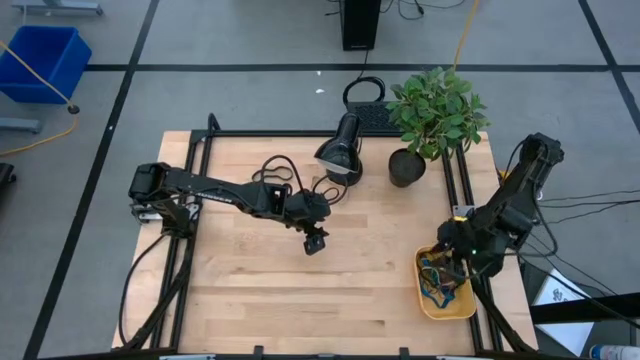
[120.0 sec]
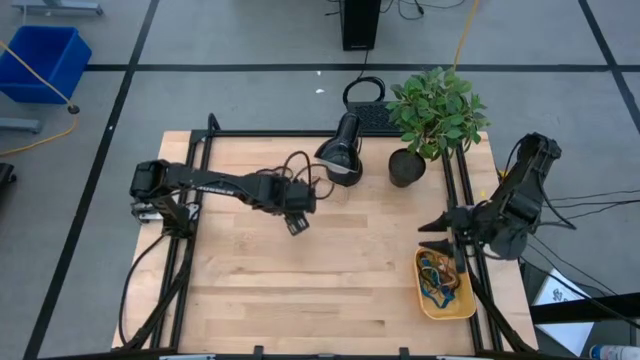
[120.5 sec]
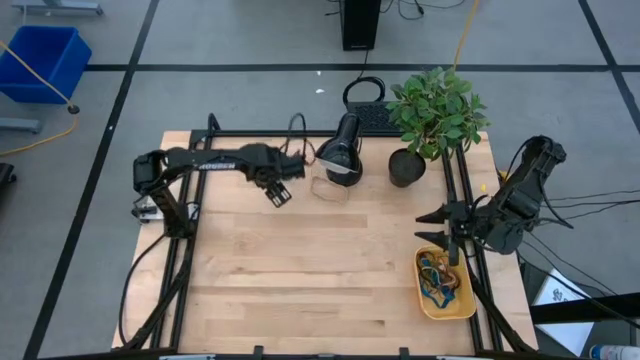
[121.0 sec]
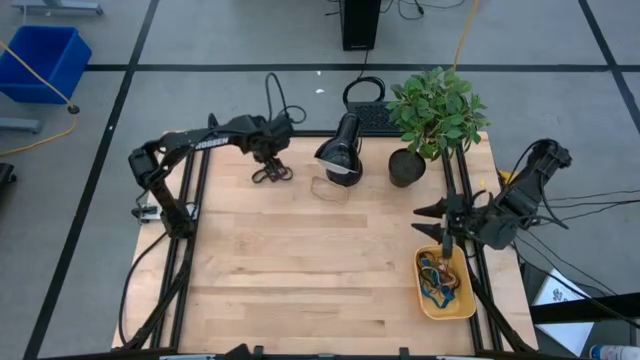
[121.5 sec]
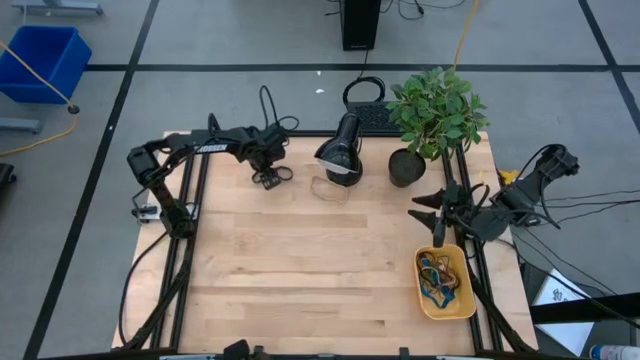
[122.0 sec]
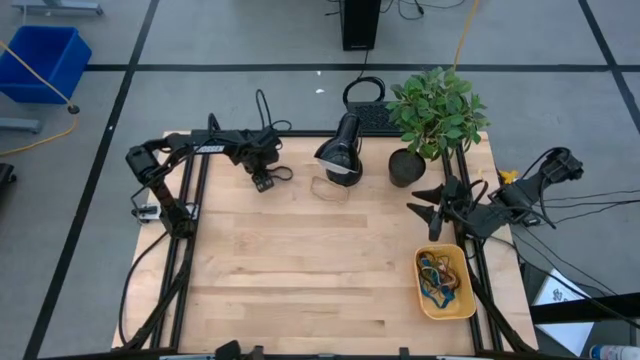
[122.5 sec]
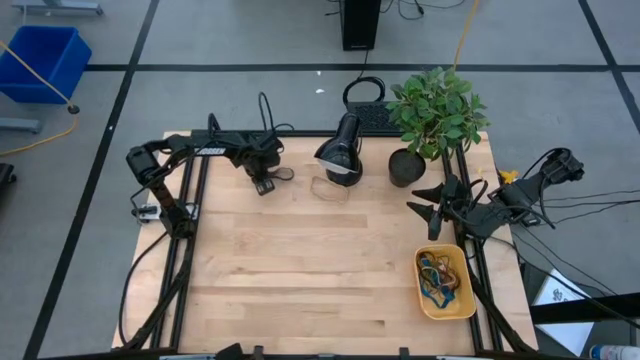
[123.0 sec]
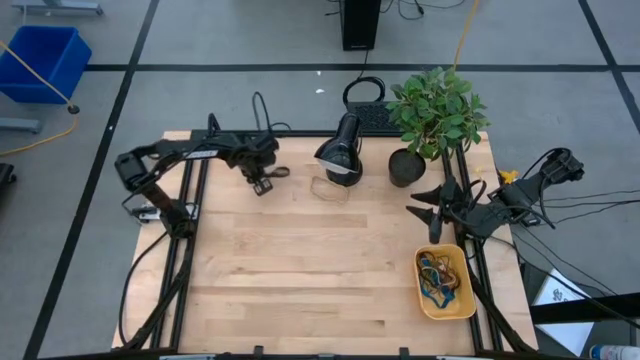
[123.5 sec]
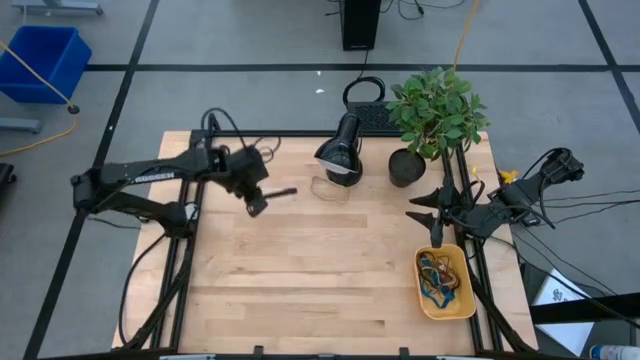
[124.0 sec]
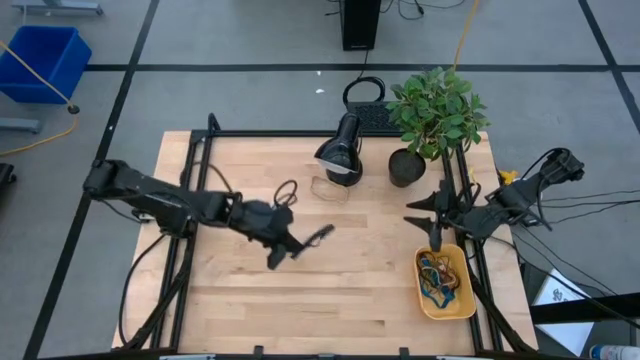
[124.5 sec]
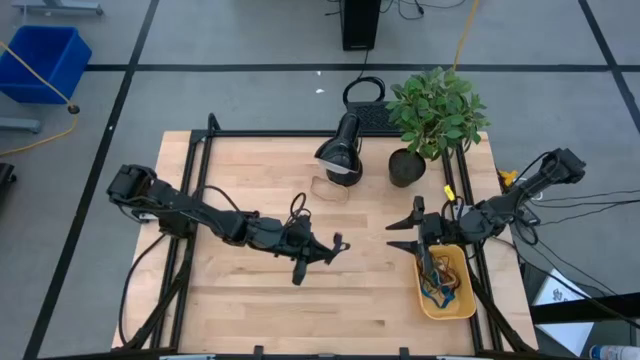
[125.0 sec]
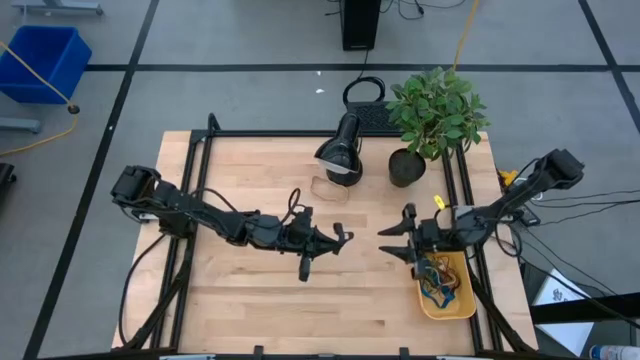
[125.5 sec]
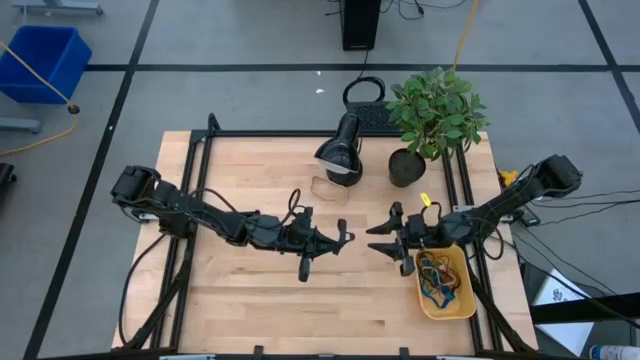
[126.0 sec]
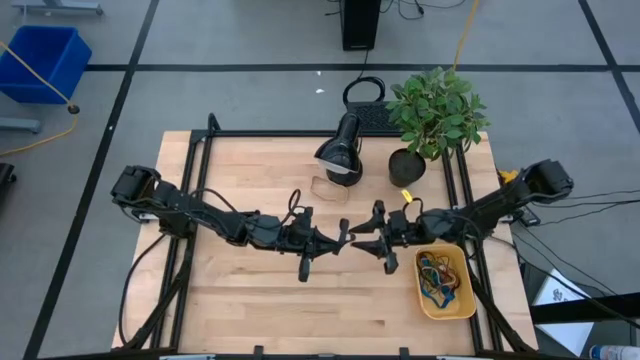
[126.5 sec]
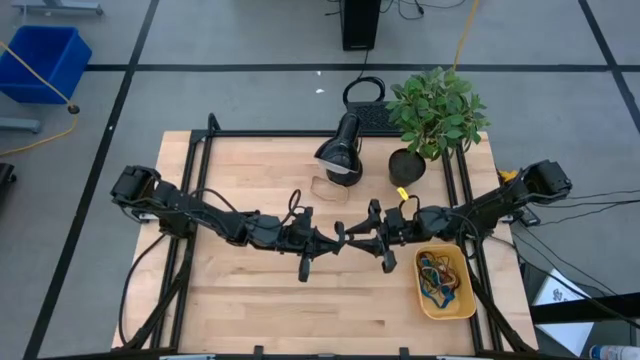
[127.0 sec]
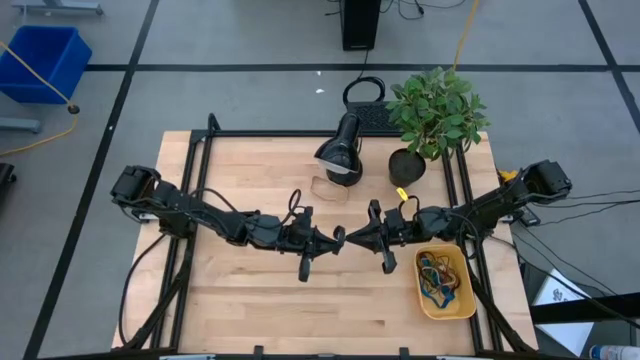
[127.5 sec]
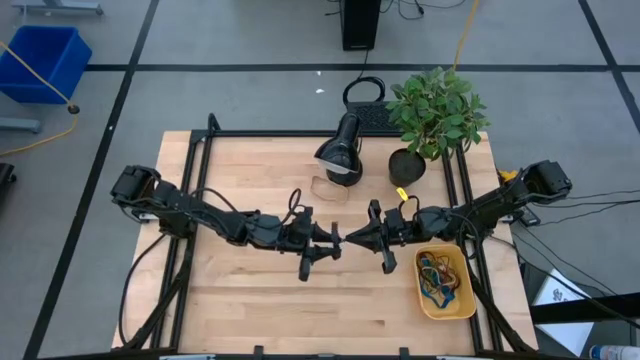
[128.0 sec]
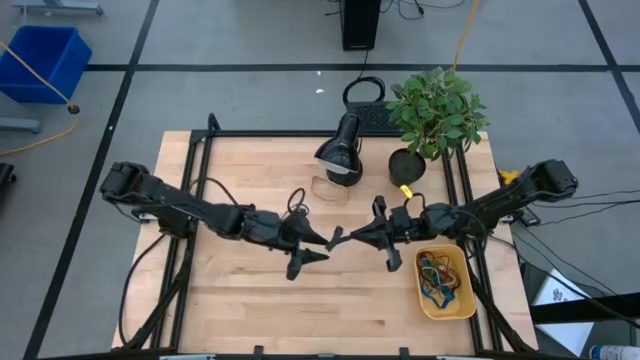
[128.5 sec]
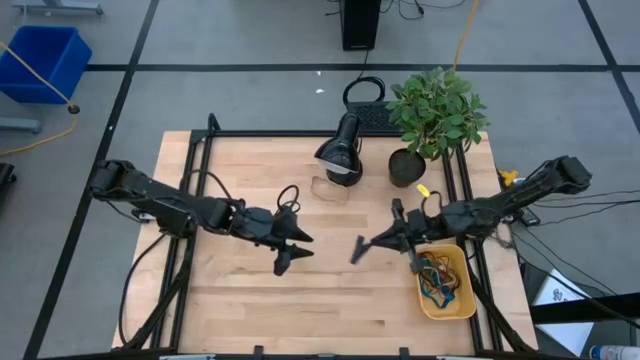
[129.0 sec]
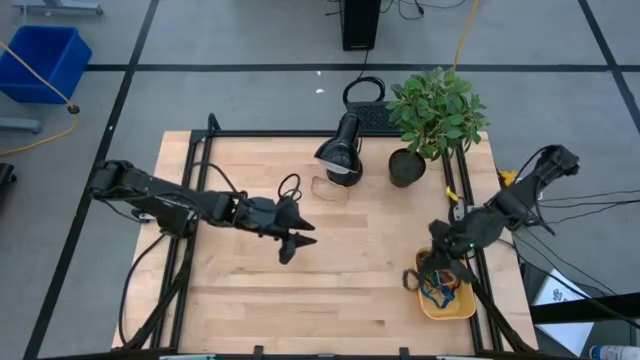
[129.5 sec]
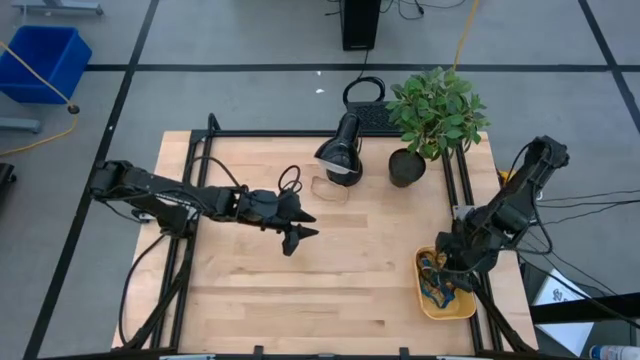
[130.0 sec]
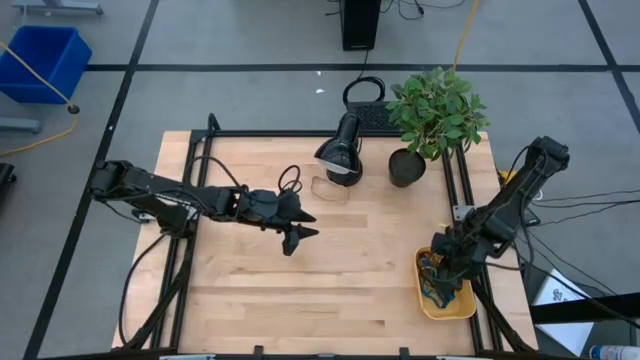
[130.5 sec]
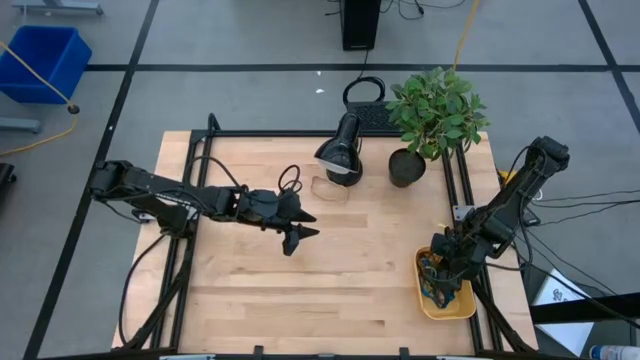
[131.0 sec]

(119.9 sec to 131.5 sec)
Task: Pick and place rubber bands into bin
Put the black rubber band into the yellow bin

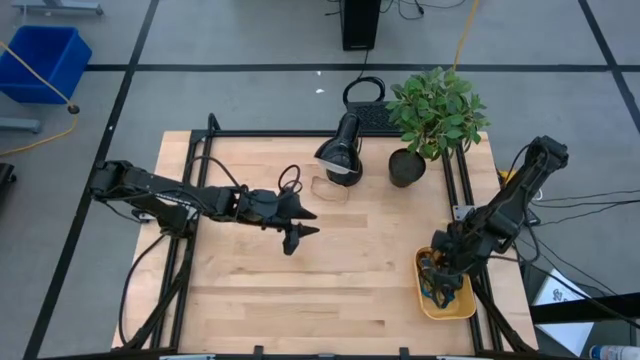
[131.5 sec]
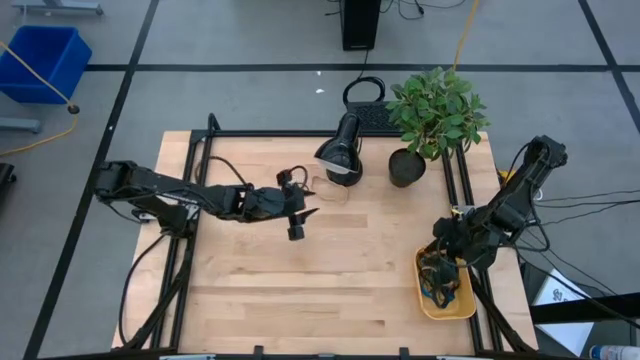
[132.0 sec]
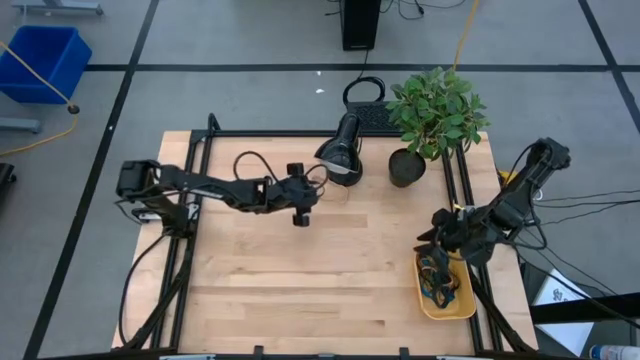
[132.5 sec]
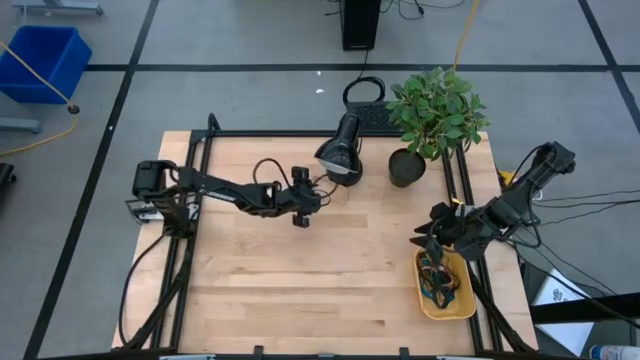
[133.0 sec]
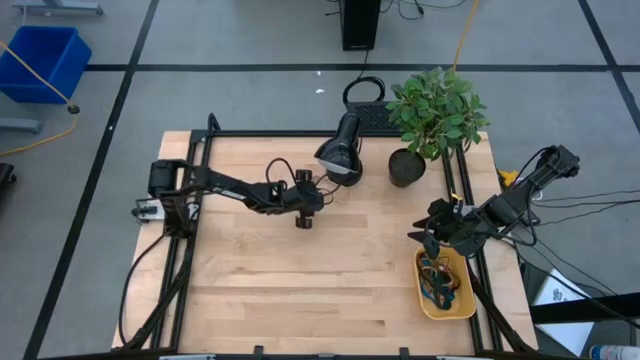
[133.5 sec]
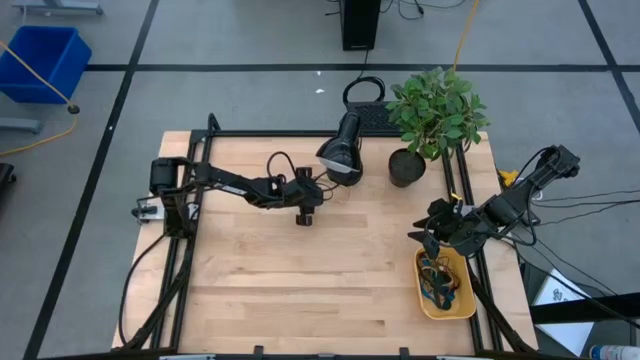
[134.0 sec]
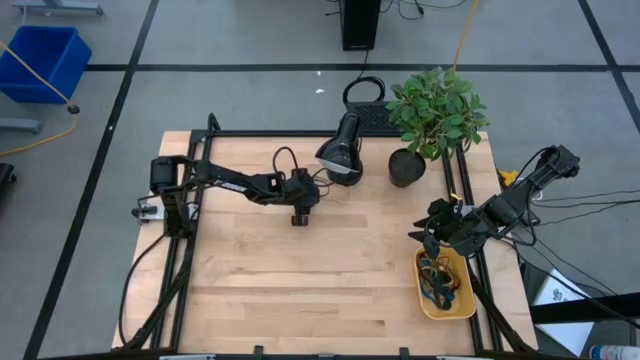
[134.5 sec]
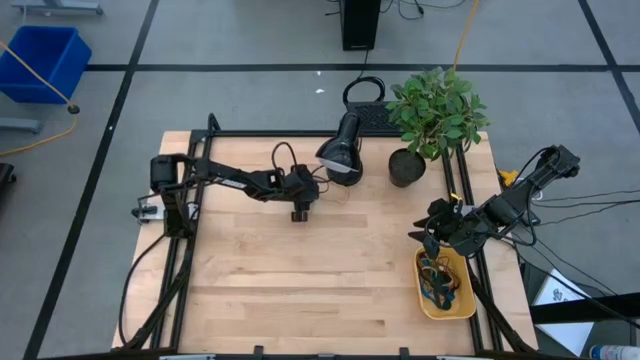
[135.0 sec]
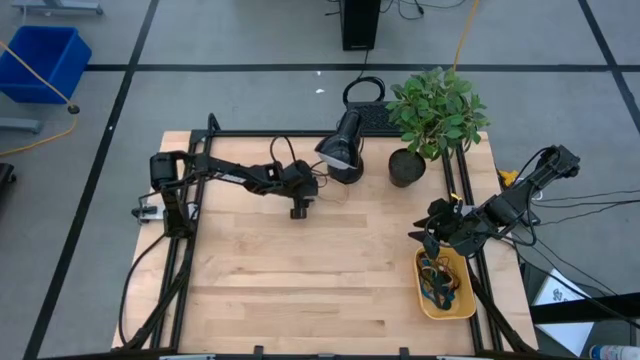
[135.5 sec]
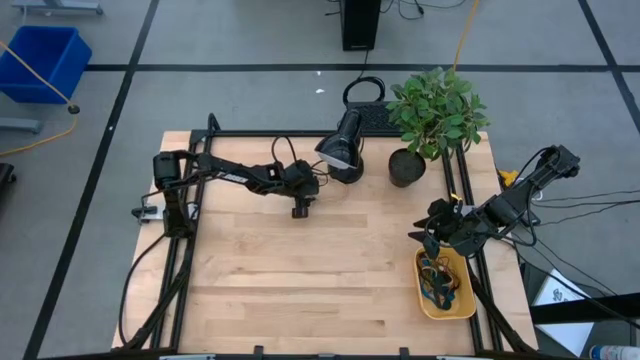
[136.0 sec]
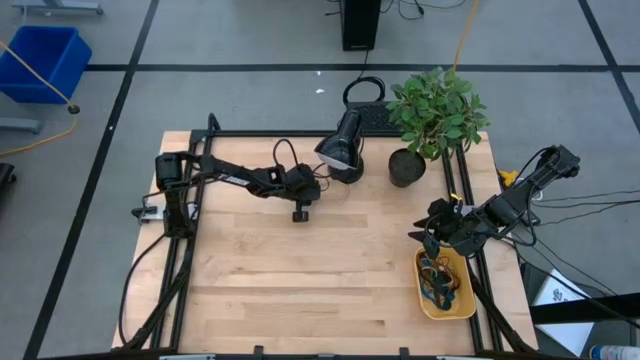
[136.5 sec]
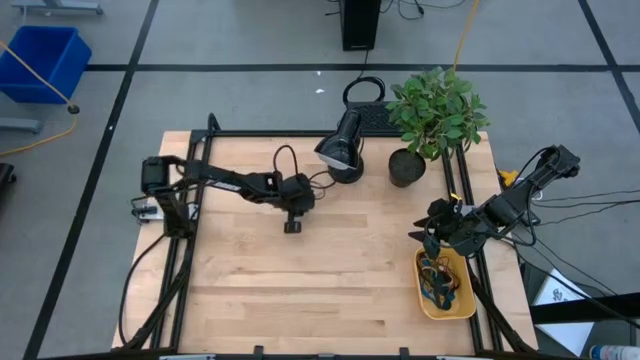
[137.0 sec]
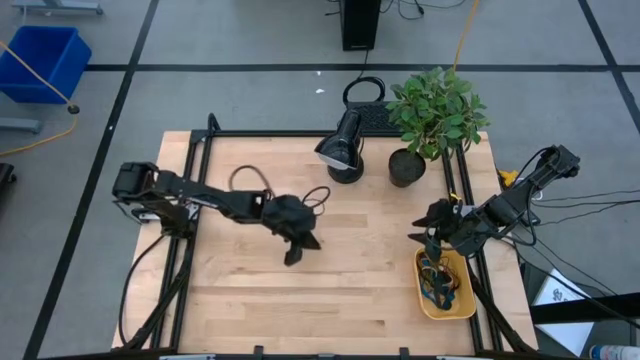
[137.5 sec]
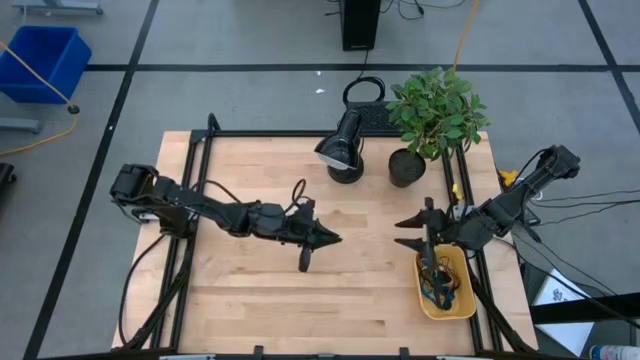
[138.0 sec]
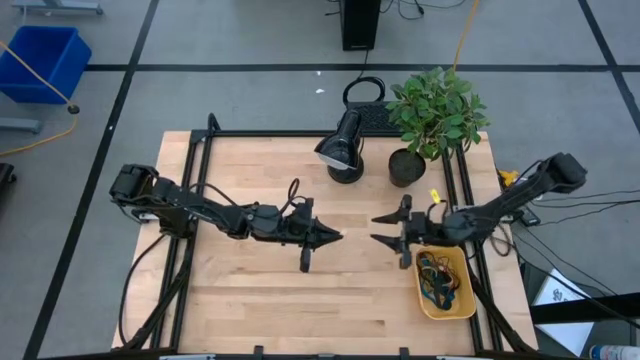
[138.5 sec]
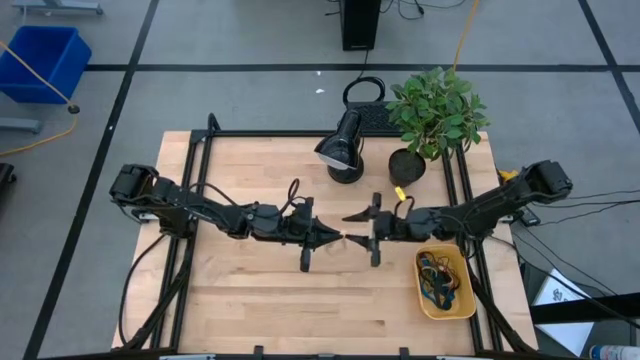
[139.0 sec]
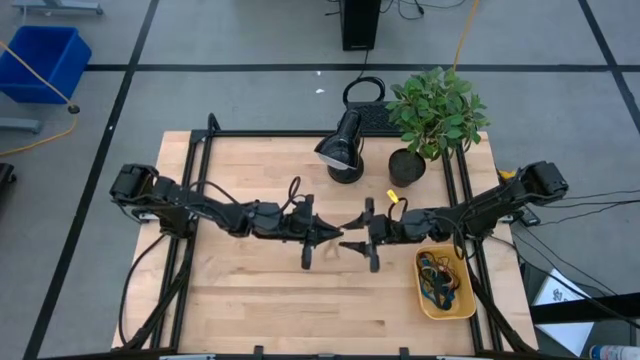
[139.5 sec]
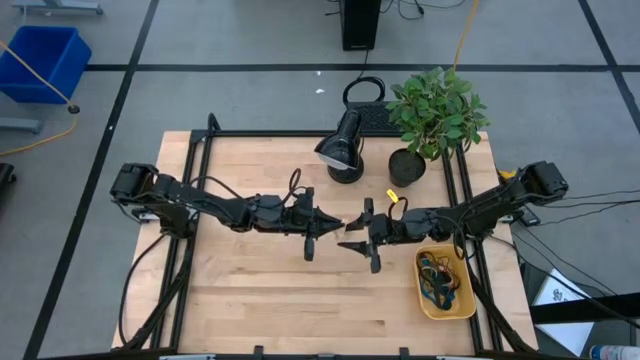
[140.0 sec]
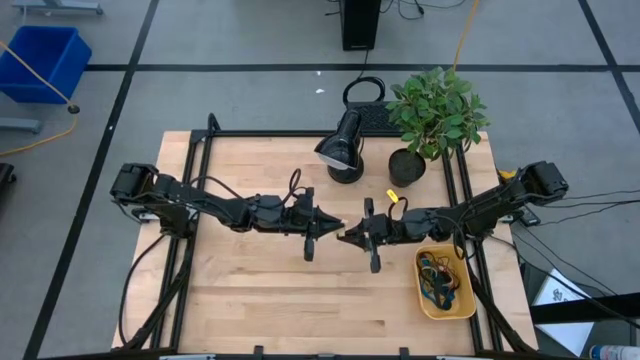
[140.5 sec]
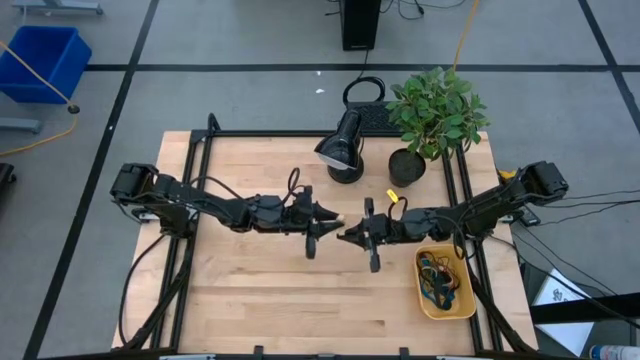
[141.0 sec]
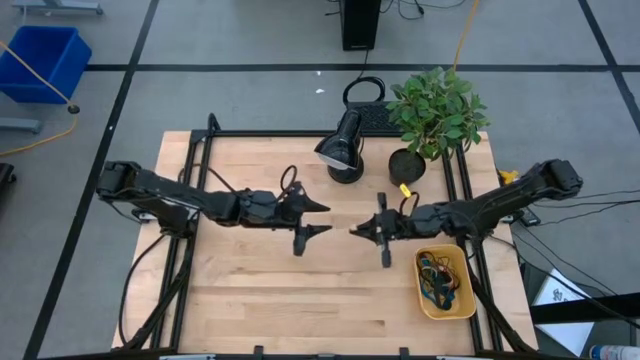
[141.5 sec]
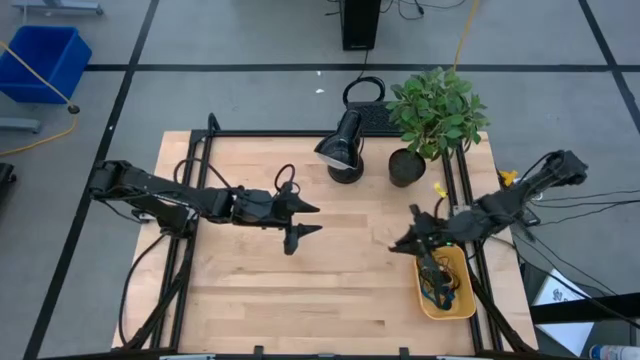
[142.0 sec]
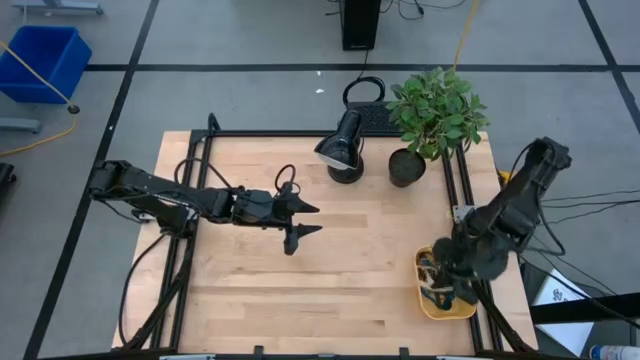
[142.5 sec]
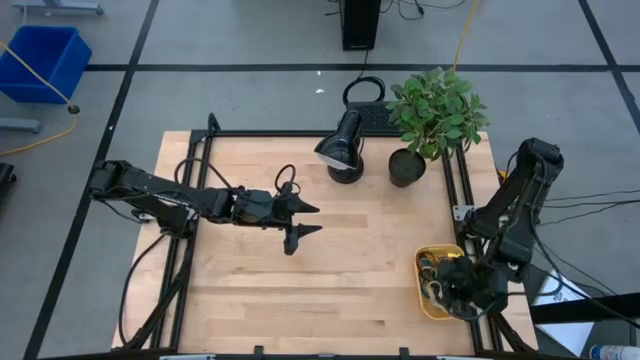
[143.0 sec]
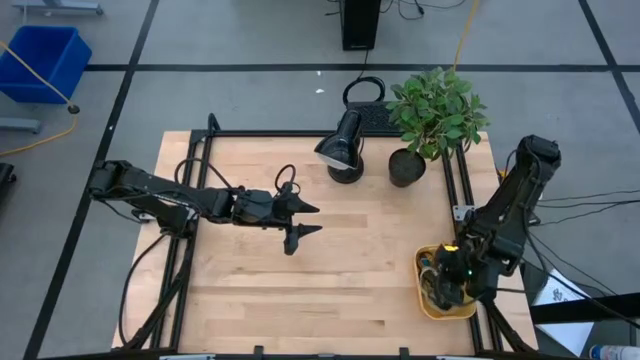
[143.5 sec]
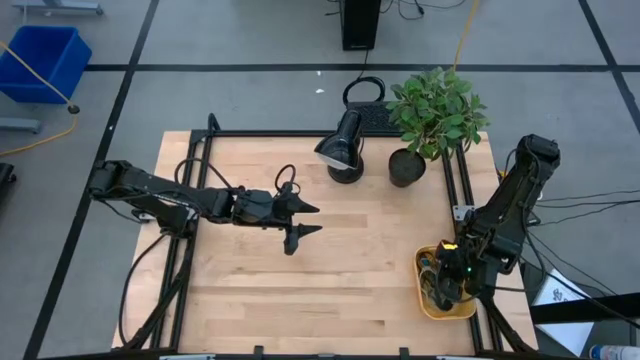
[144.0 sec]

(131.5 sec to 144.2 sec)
Put the brown rubber band into the yellow bin
